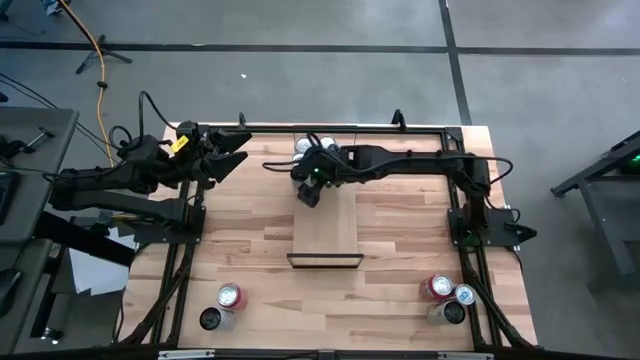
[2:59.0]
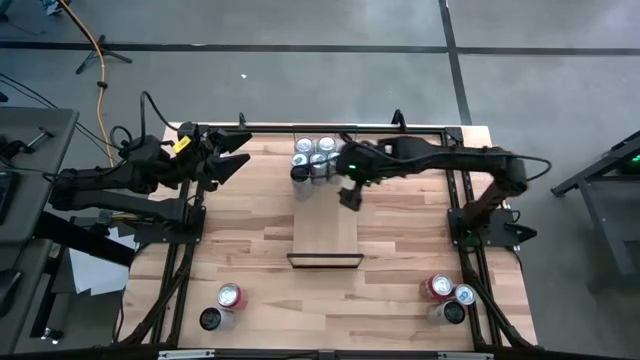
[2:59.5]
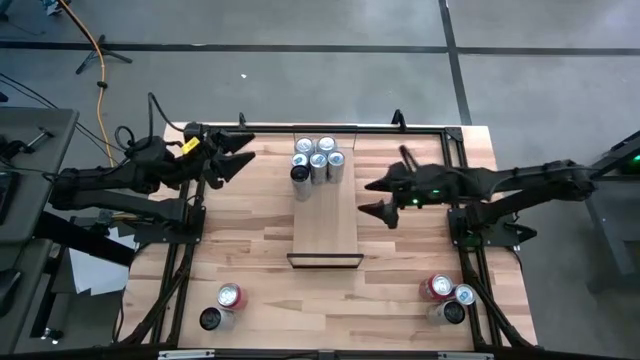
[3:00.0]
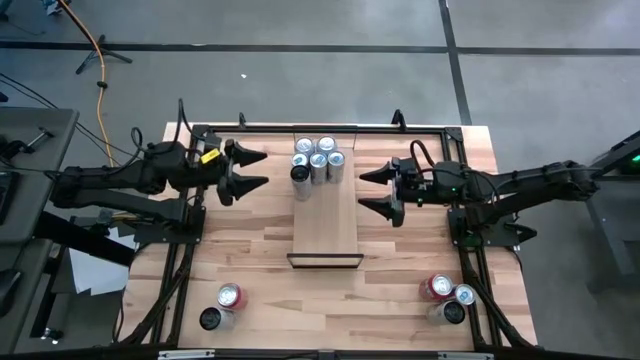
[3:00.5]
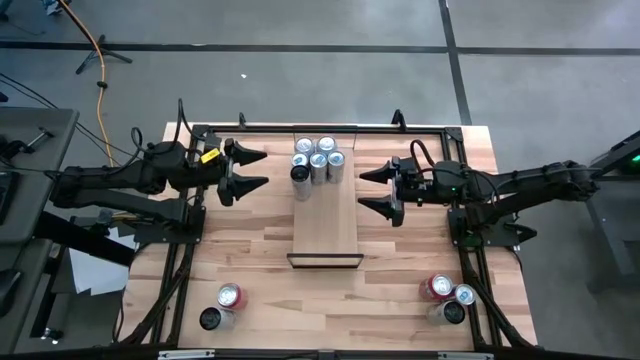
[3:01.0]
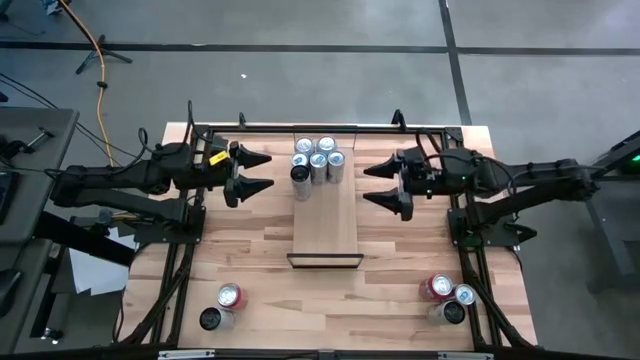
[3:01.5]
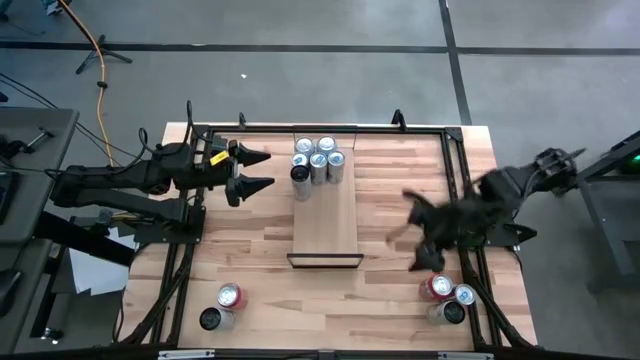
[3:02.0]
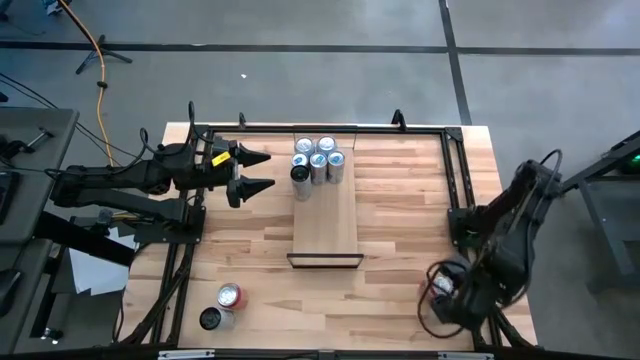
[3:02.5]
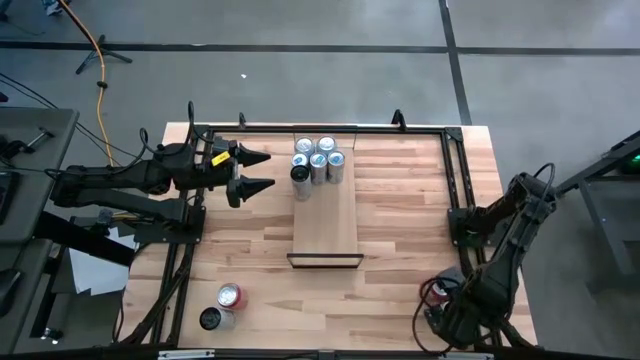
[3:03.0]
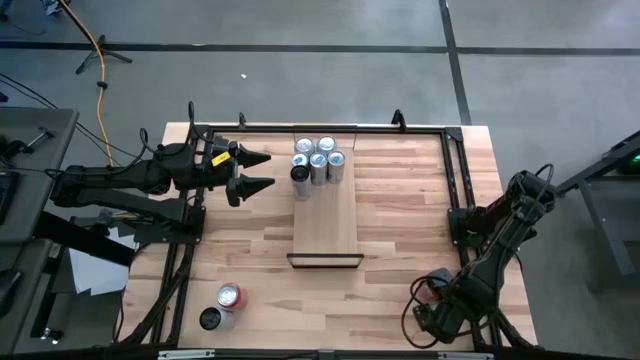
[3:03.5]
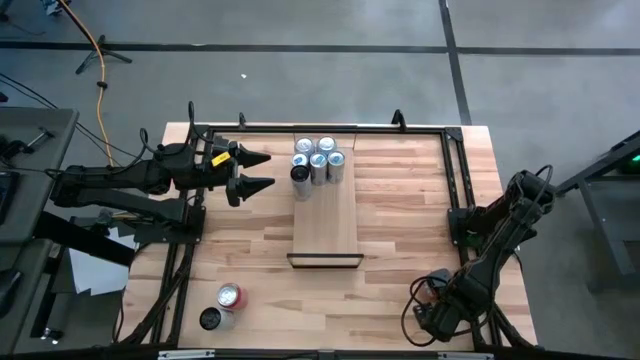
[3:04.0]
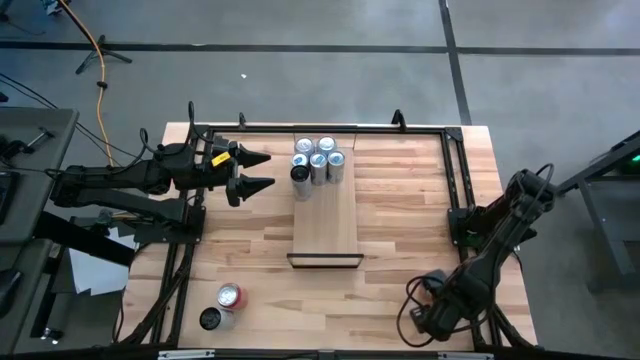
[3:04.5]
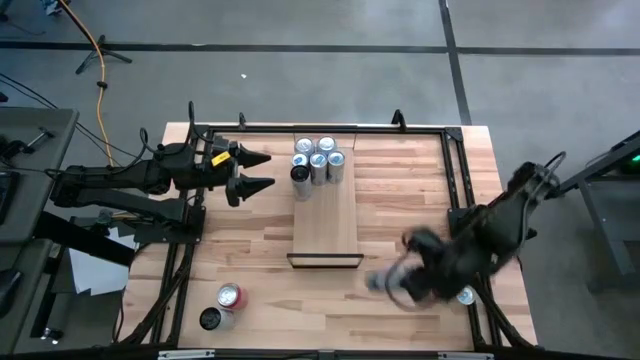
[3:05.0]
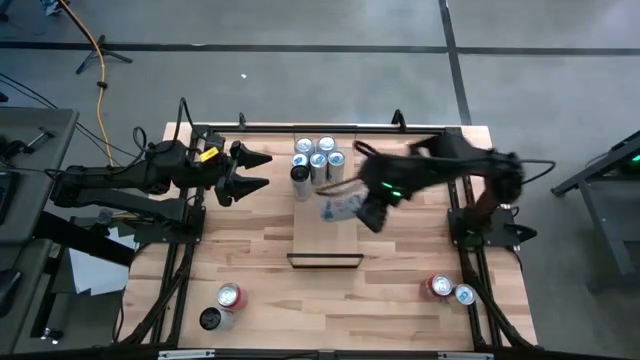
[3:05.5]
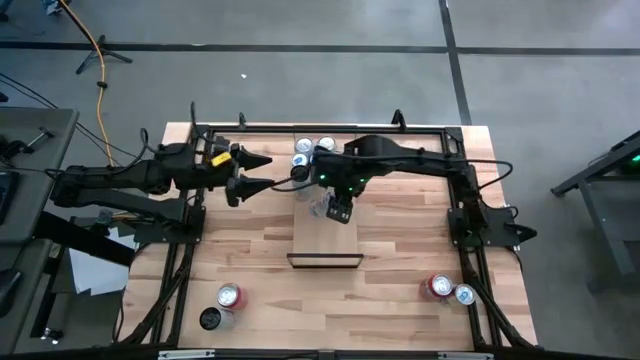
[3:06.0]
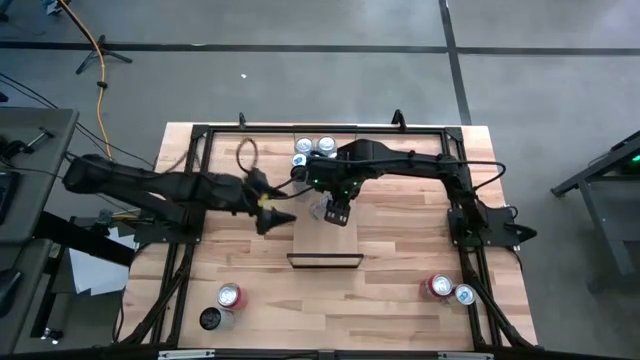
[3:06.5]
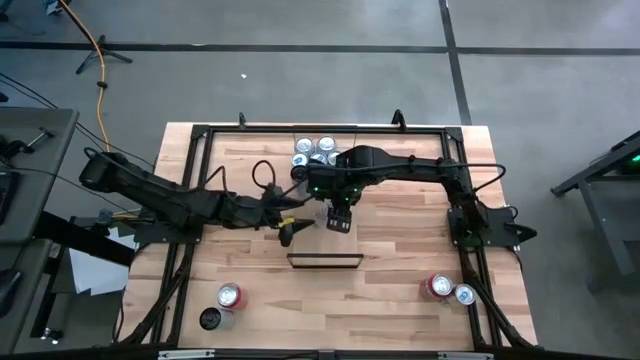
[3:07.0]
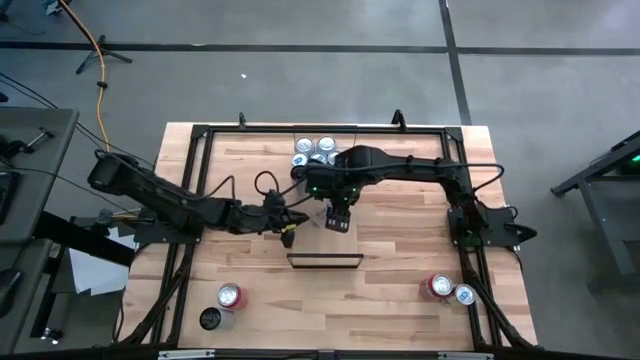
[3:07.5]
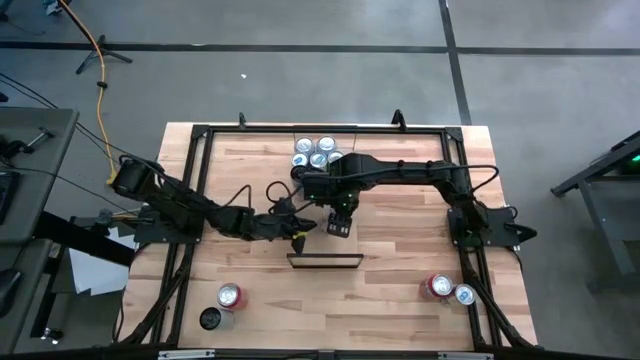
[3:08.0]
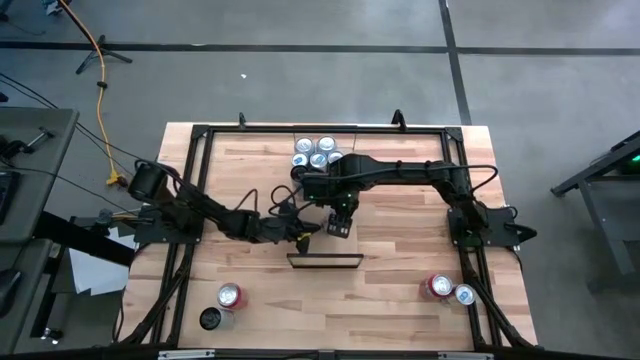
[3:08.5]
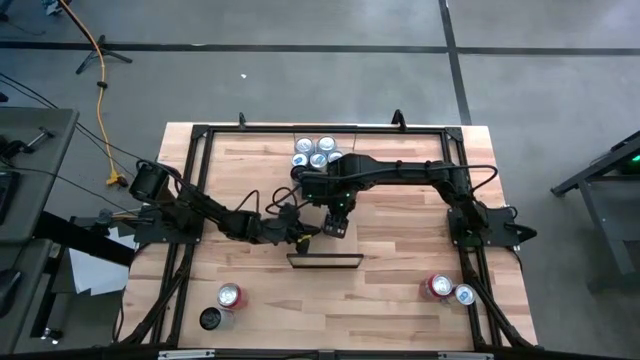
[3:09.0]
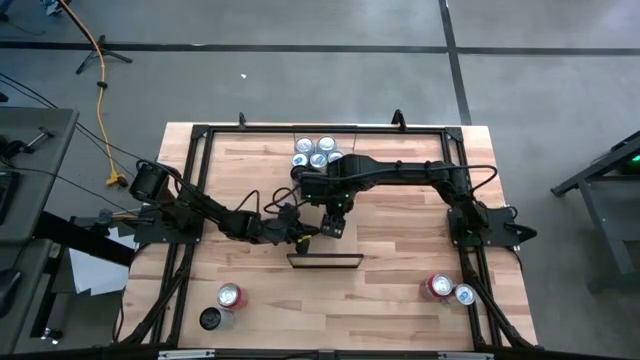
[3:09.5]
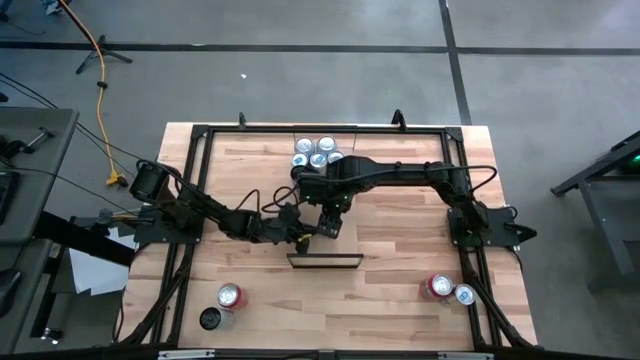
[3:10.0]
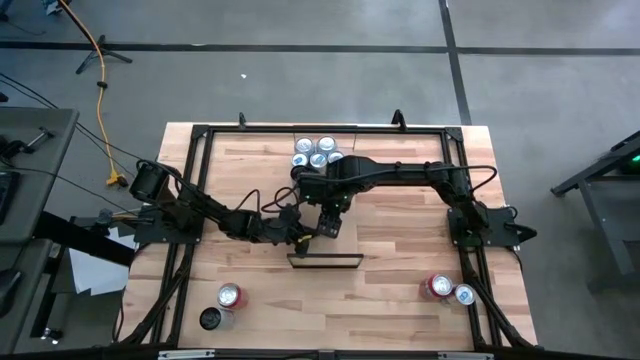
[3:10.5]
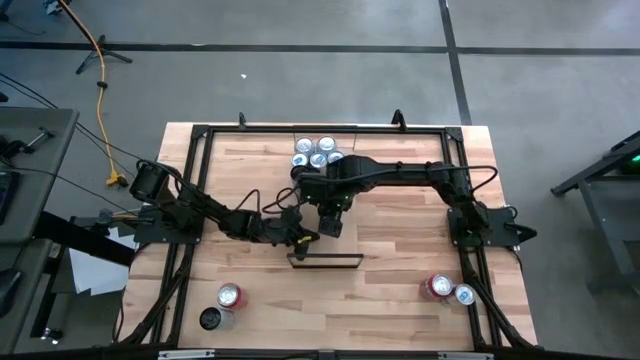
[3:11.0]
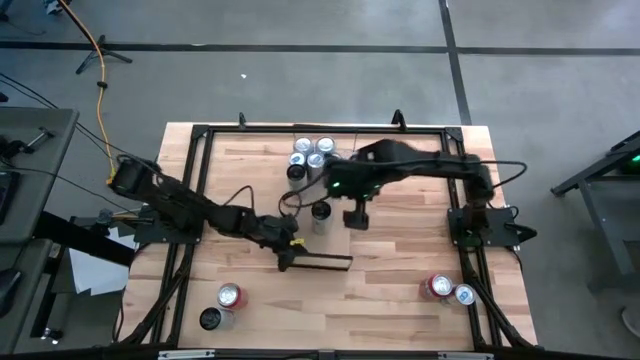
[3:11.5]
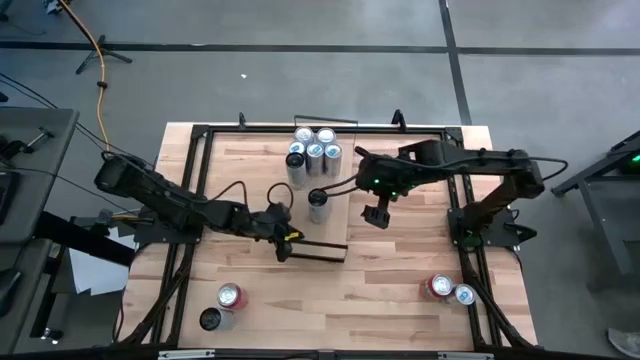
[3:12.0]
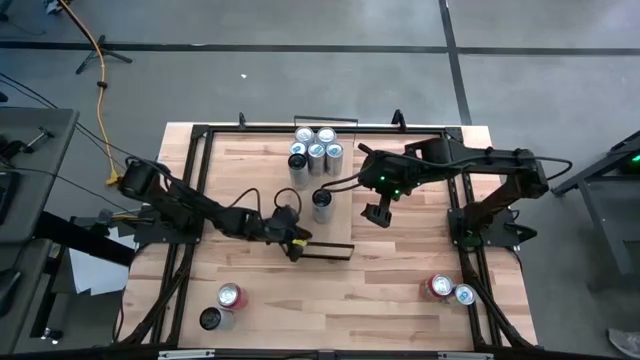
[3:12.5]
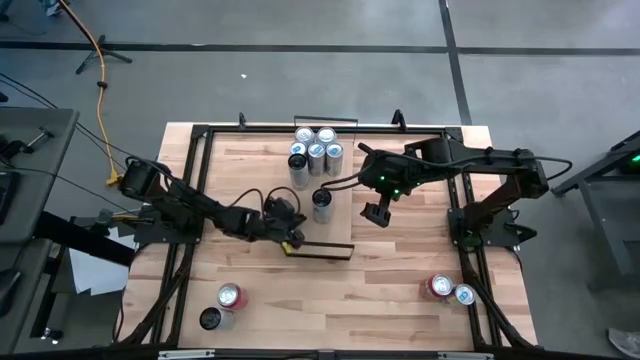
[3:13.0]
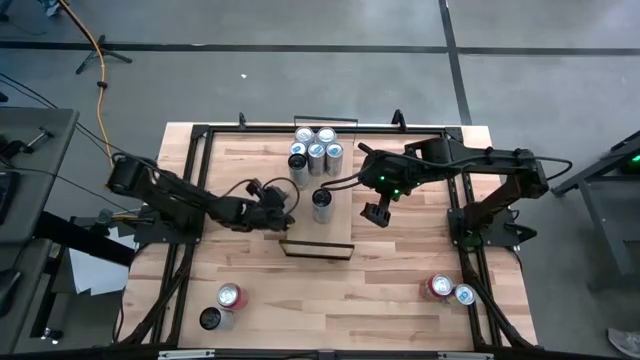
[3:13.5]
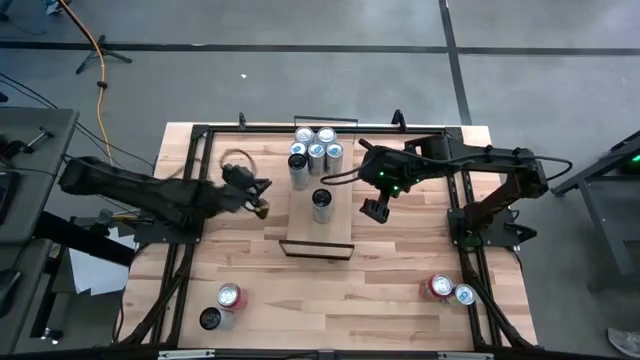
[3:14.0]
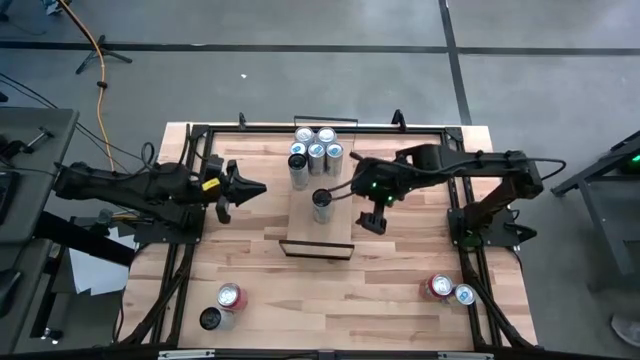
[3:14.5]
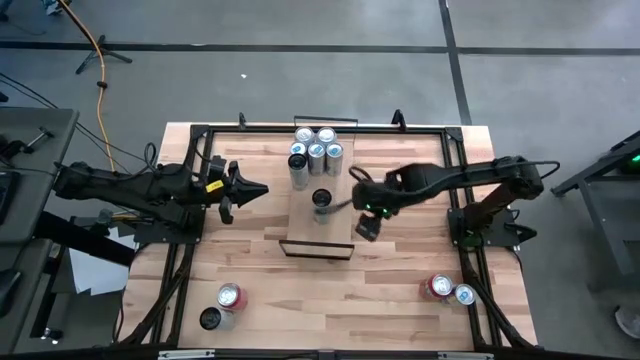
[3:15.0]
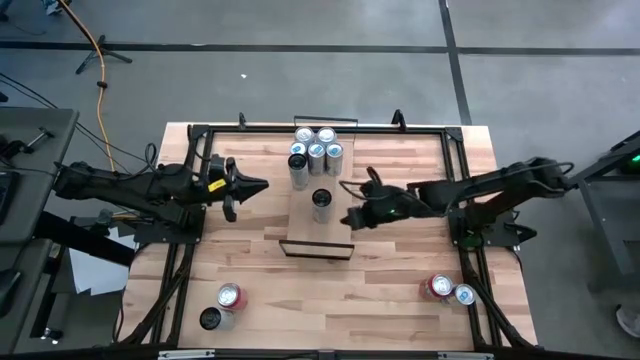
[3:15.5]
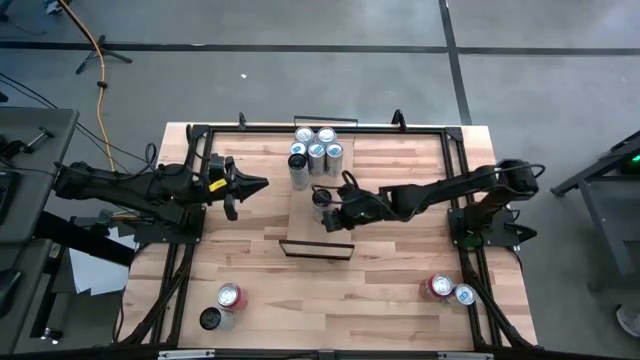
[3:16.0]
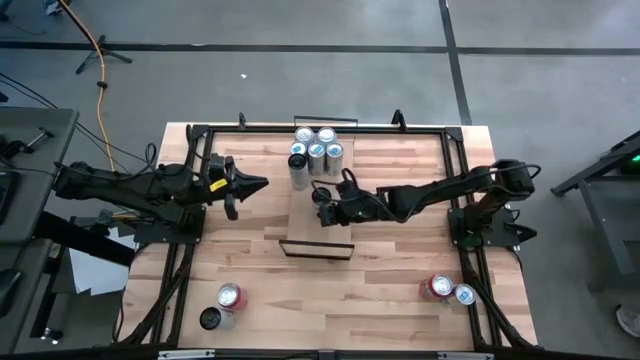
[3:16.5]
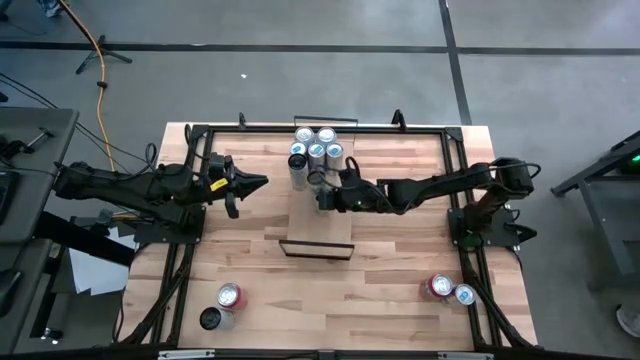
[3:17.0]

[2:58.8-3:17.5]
Task: Place canned beverage on shelf
Put the white pink soda can on the shelf aligned with the other white pink soda can

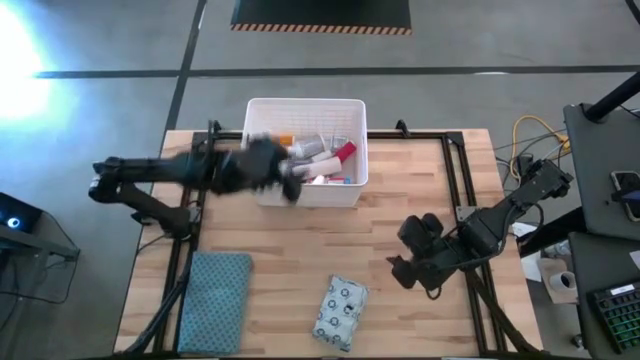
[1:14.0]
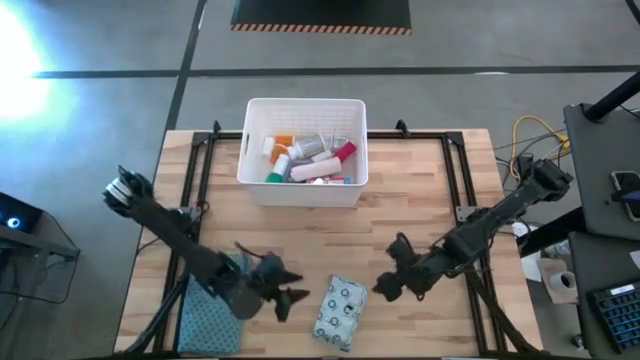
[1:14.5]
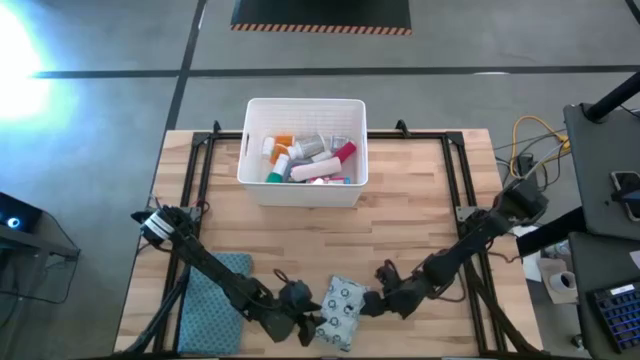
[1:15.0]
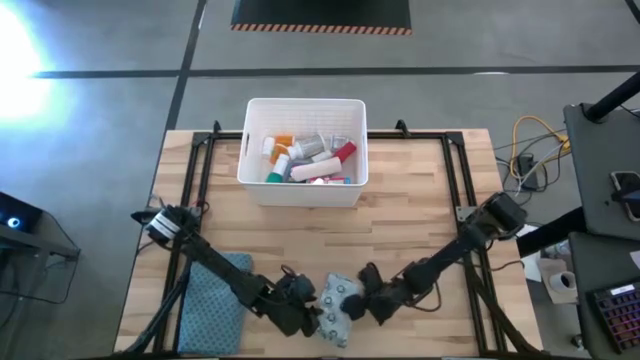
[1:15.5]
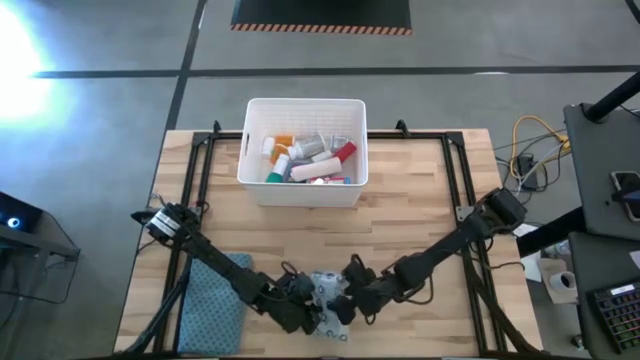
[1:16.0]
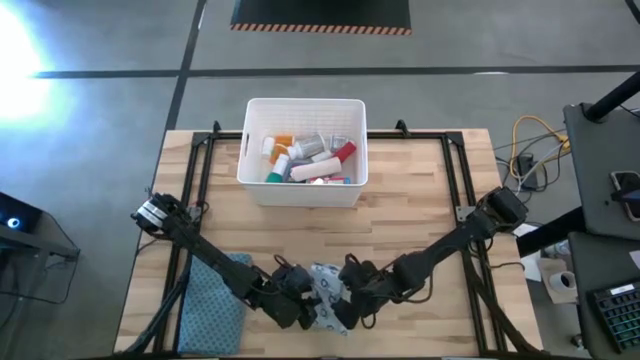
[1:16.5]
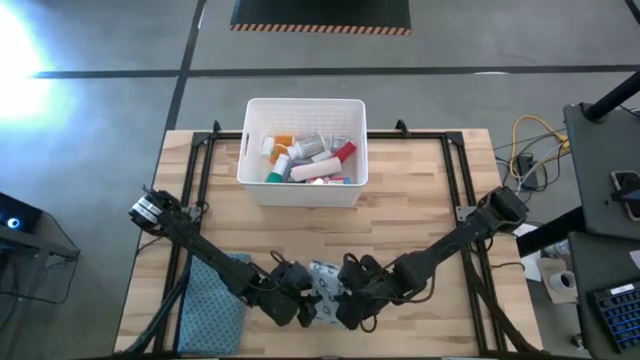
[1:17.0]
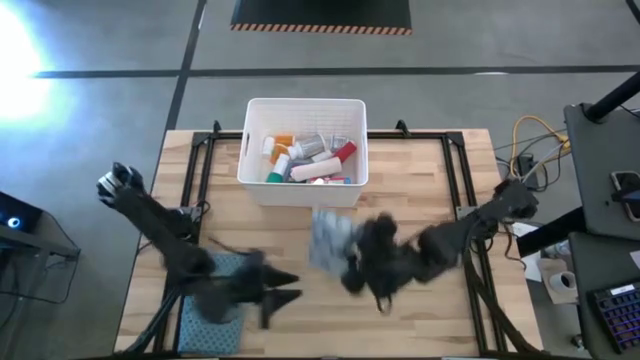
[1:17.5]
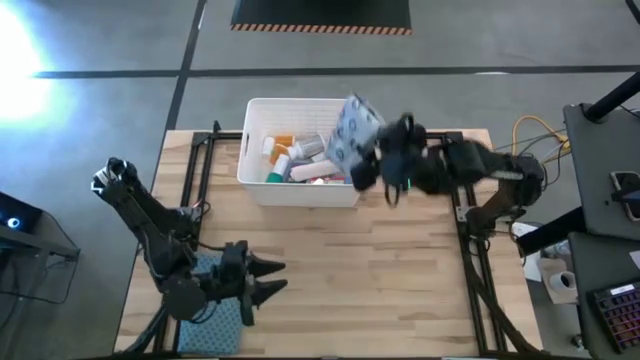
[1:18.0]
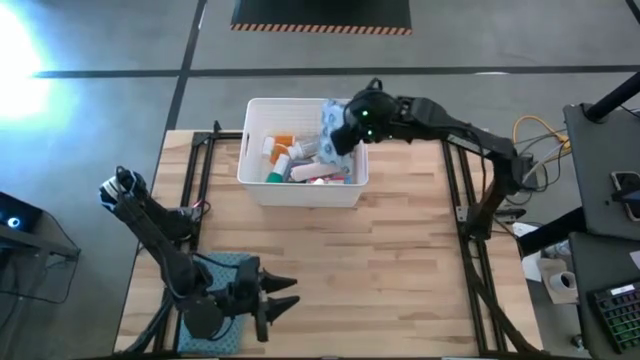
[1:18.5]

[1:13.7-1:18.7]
Task: Pick & place medical supplies in basket/bin
Put the mailer bag into the white bin
